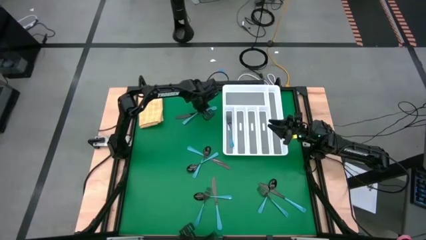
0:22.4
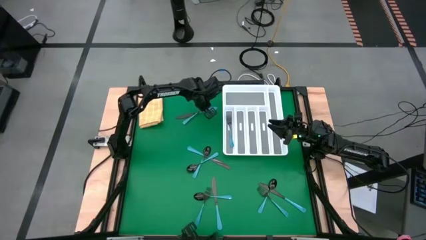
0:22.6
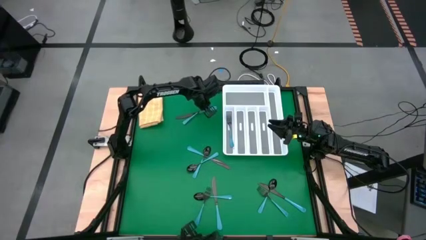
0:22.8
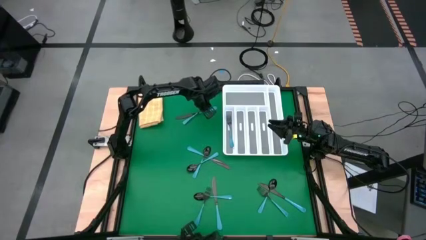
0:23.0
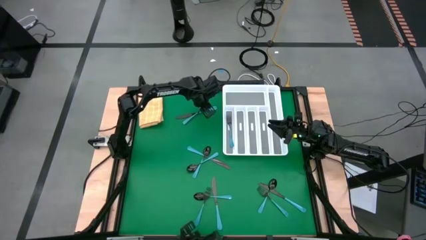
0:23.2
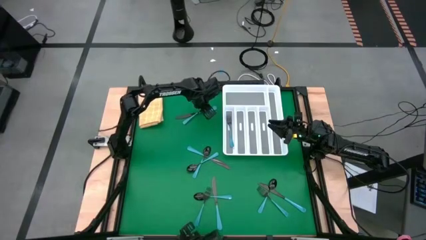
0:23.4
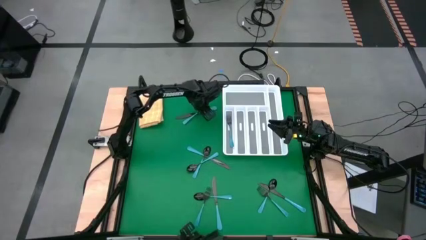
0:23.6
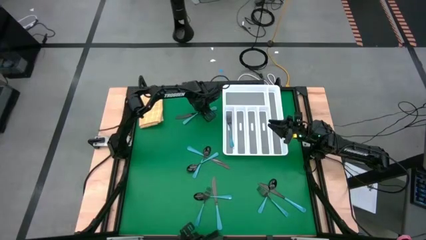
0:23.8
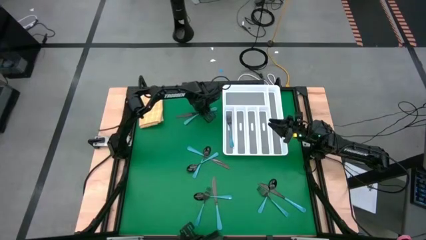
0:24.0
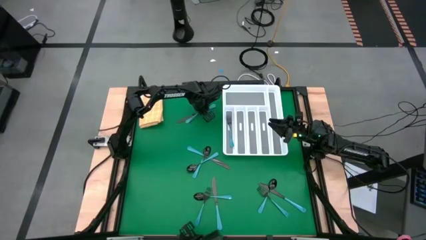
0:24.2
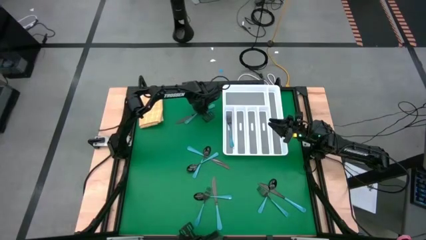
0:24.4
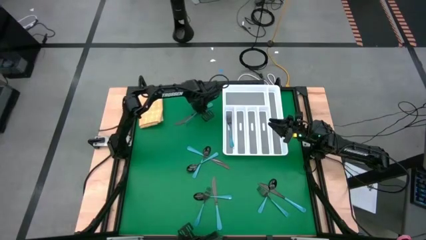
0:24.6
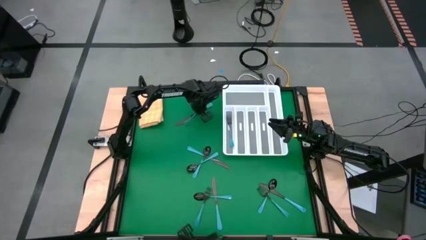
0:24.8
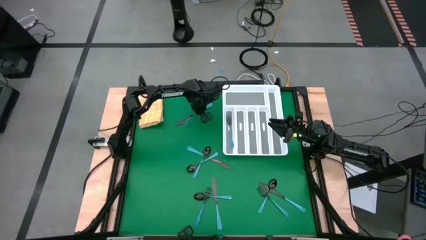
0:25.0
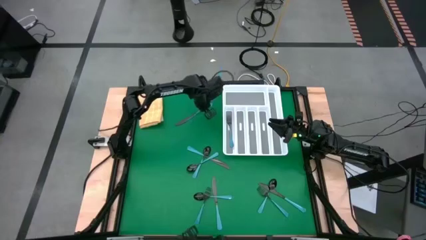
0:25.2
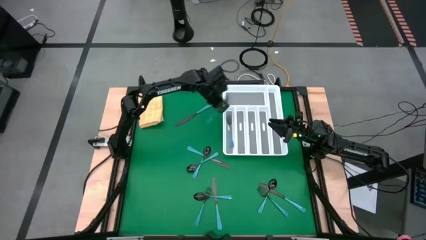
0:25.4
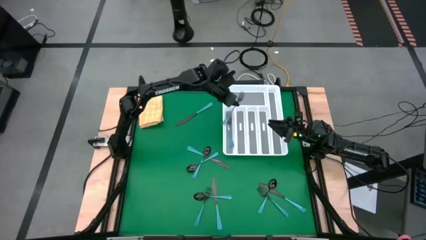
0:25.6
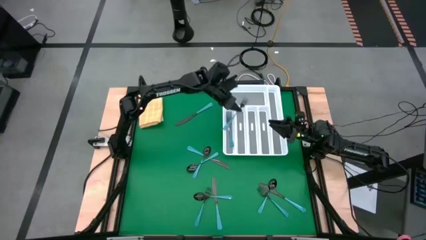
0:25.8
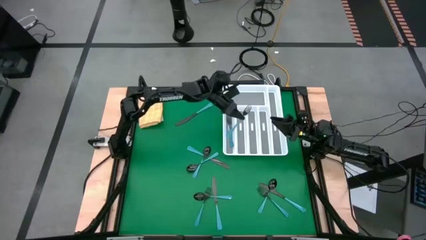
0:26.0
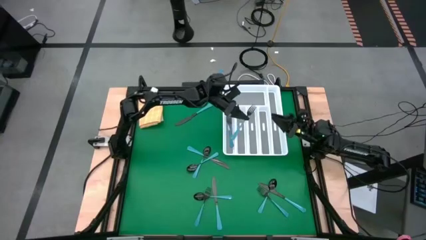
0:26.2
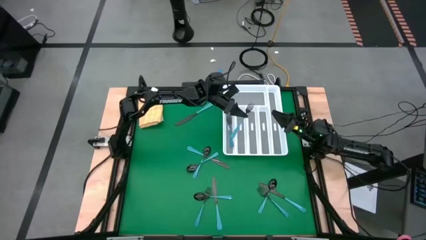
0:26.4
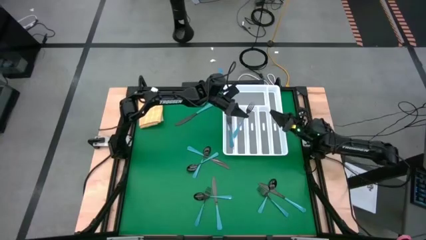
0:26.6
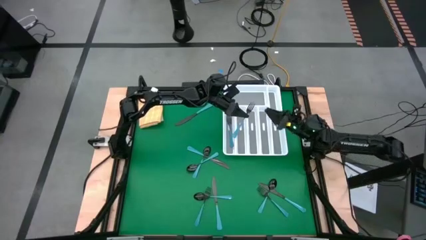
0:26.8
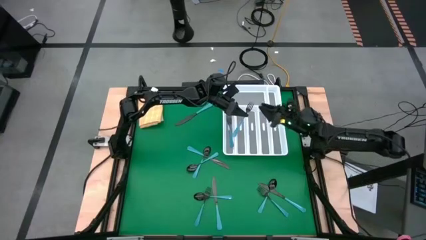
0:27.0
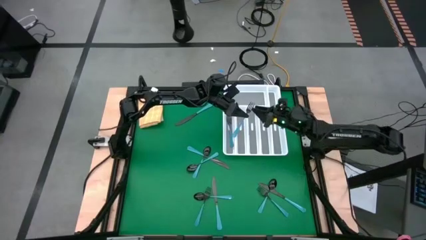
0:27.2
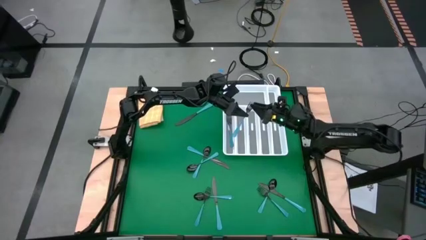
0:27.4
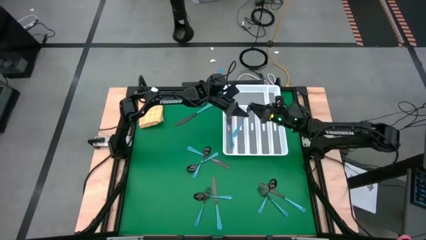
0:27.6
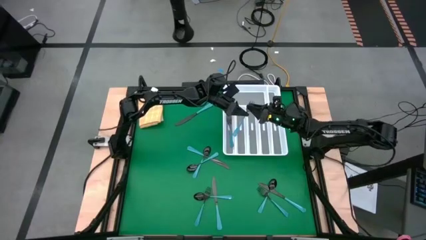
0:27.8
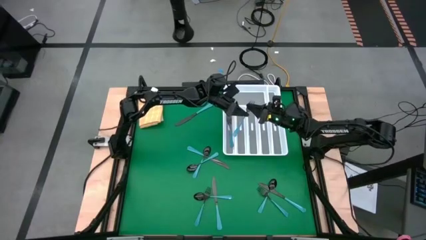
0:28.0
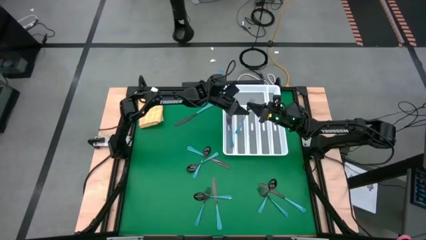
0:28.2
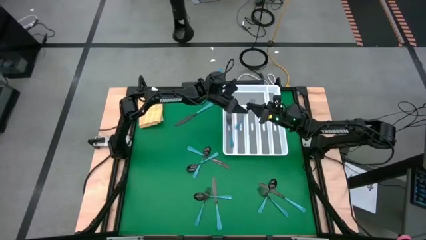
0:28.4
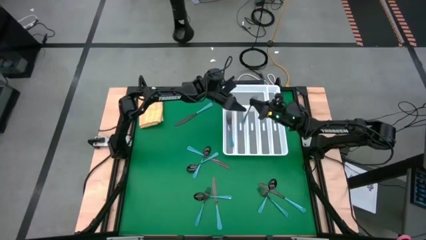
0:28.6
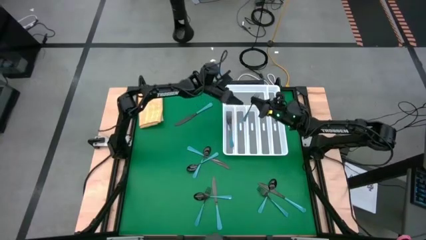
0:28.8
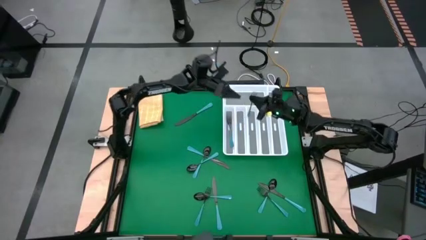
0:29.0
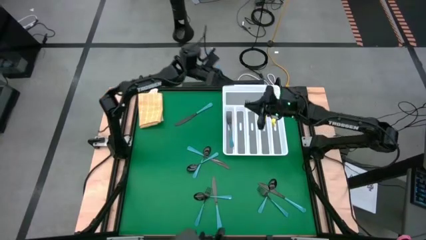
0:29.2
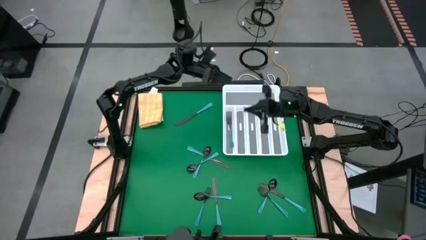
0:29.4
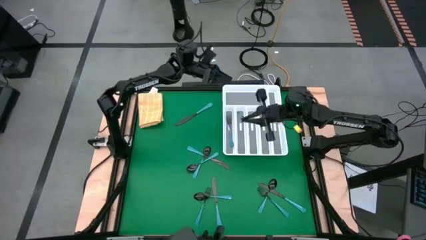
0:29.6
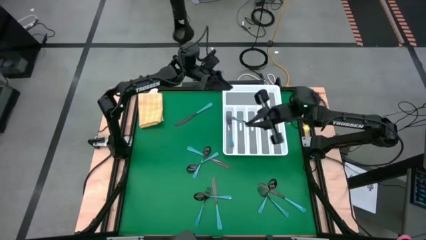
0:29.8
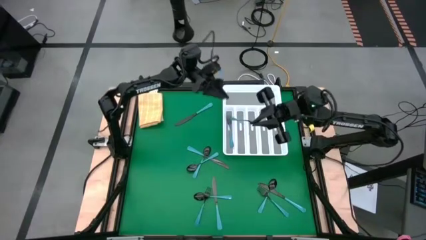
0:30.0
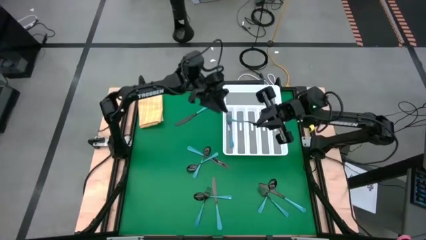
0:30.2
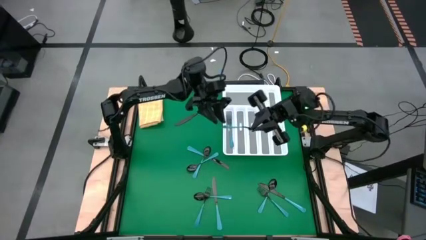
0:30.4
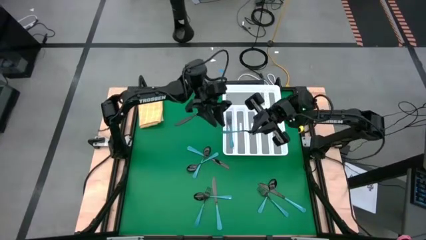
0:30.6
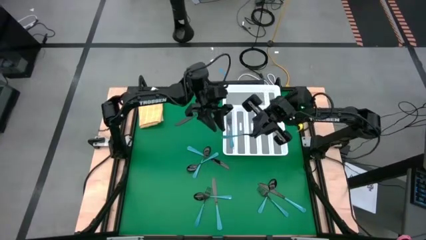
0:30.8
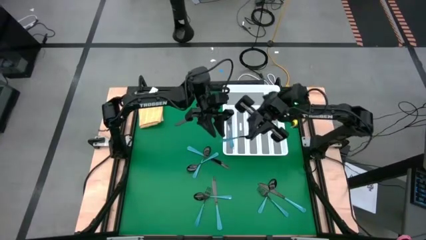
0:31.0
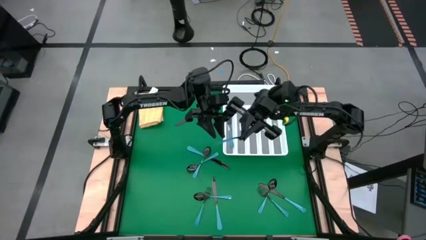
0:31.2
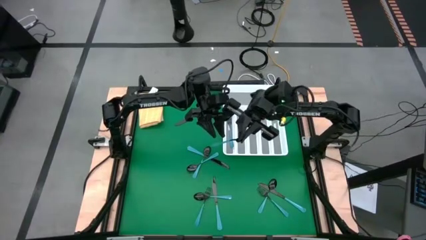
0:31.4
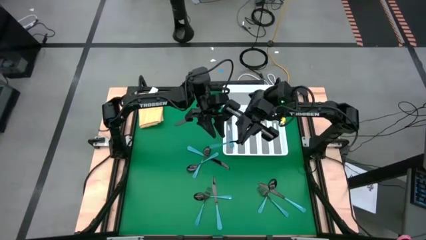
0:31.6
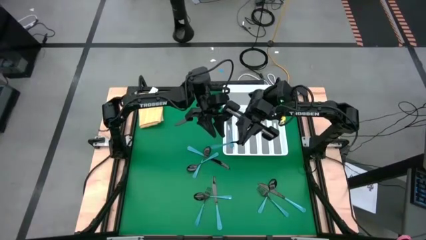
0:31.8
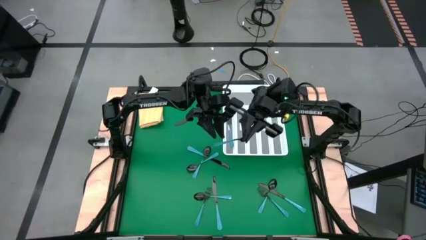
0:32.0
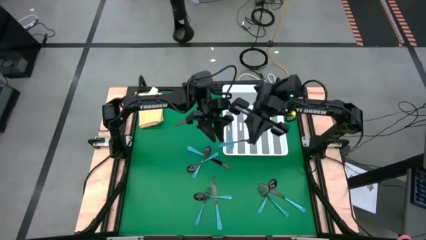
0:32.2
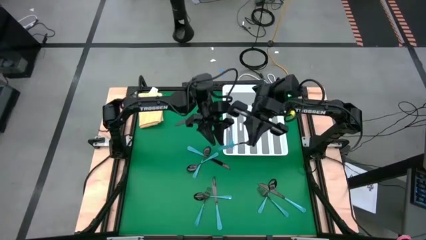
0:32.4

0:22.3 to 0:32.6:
Task: Sort silverware
Put the blue fork into the silverware organizer

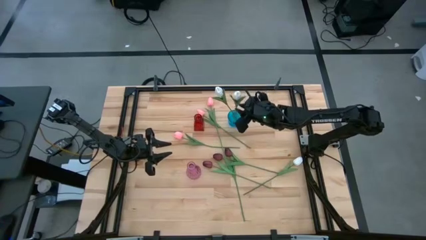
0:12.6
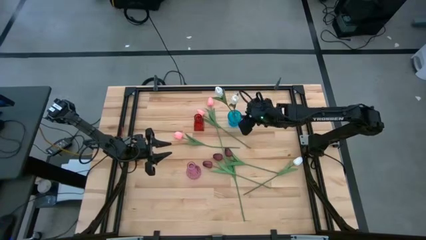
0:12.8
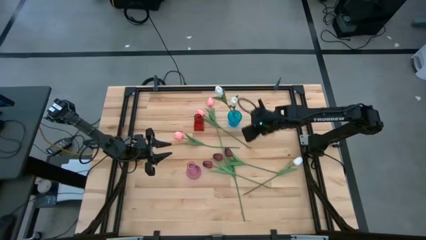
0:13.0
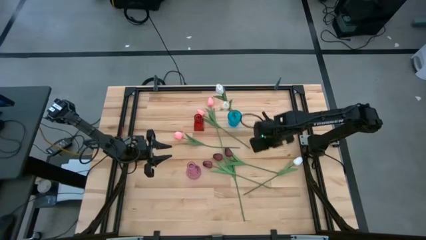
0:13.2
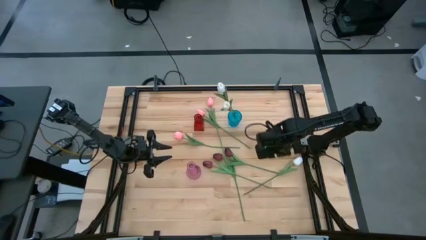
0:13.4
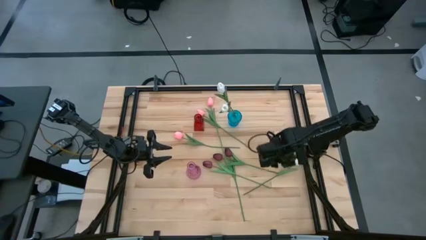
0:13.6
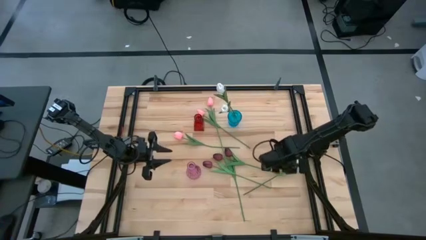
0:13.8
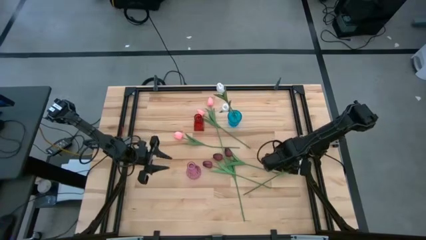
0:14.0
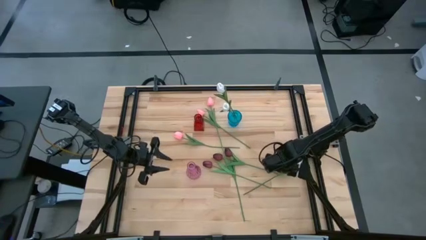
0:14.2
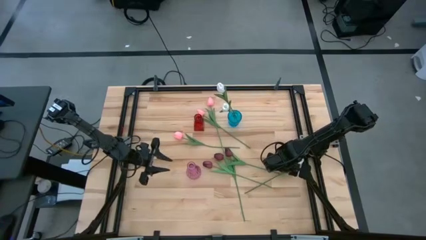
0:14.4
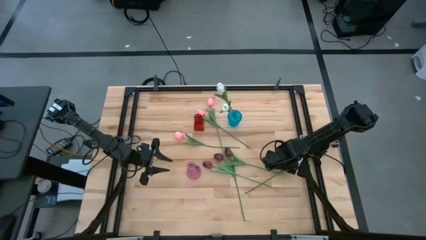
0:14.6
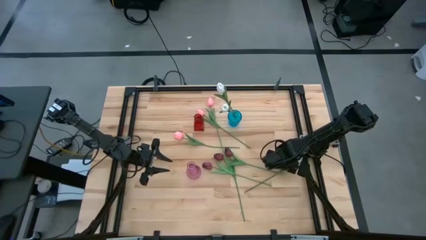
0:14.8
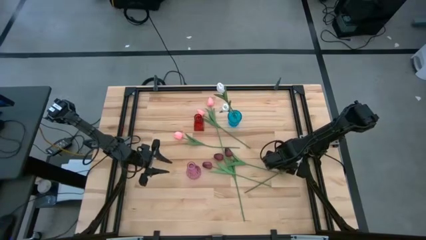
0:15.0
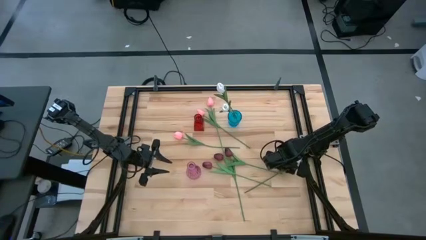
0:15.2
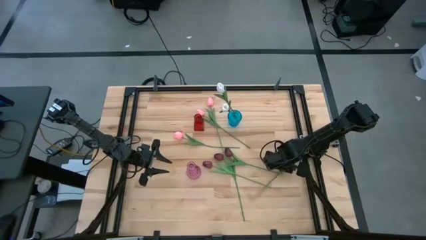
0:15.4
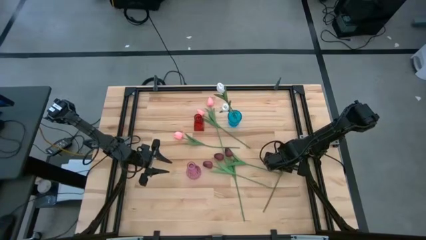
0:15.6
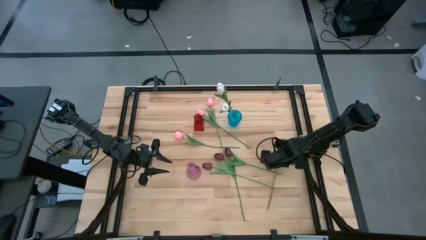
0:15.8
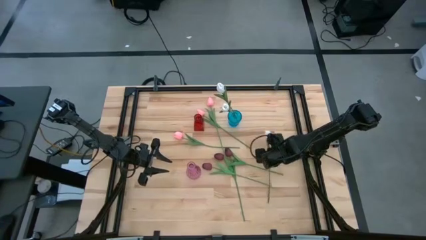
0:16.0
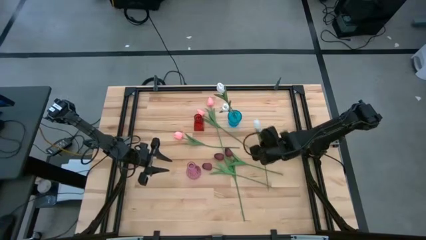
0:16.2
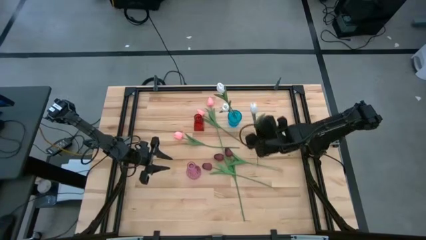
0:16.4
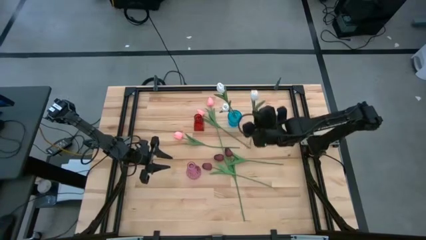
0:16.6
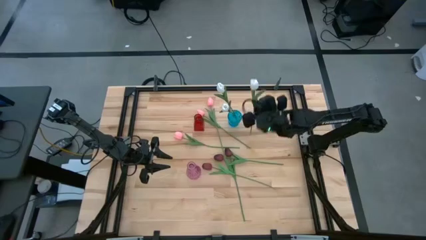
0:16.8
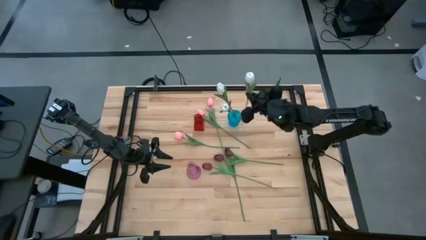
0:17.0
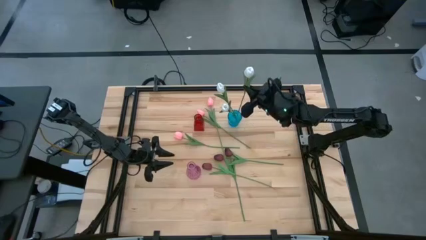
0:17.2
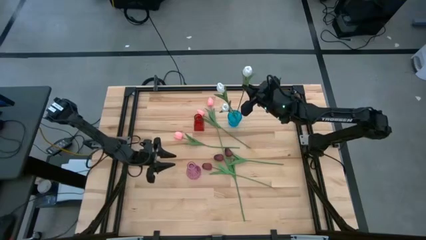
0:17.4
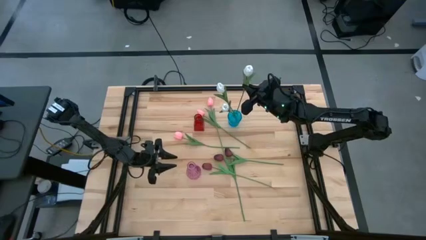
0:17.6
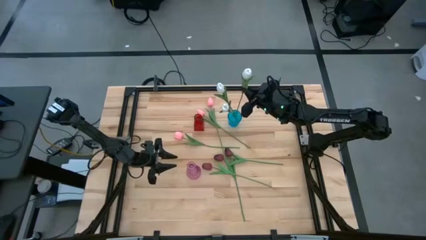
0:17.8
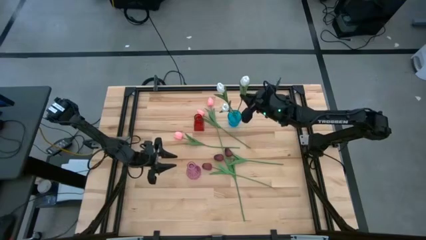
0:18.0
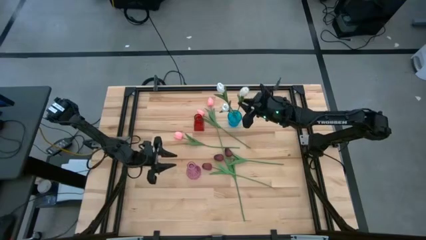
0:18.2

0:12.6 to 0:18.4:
Task: Sort flowers into vase by color
Put the white flower into the blue vase

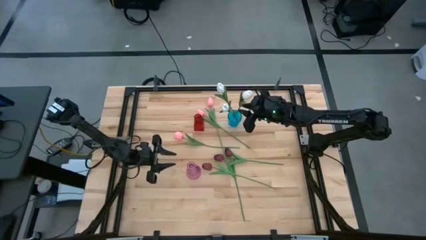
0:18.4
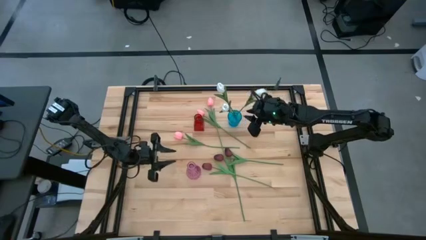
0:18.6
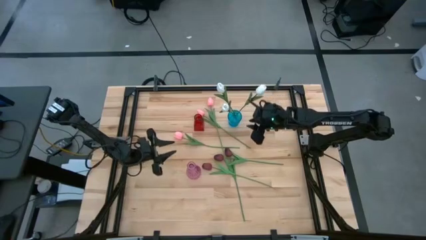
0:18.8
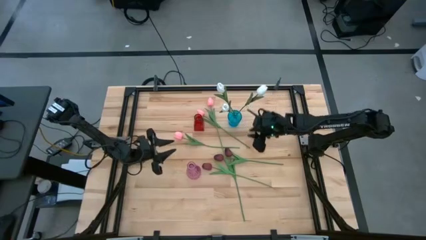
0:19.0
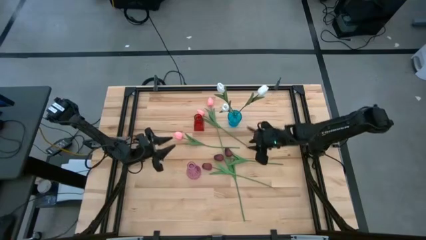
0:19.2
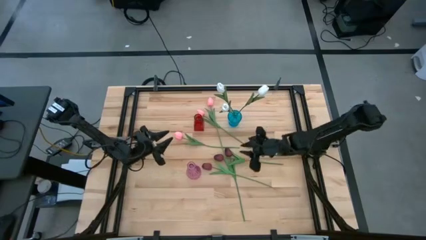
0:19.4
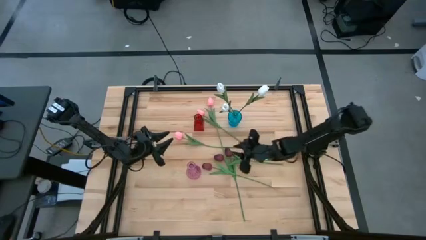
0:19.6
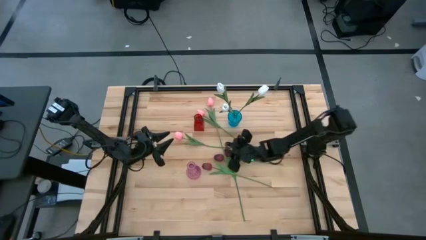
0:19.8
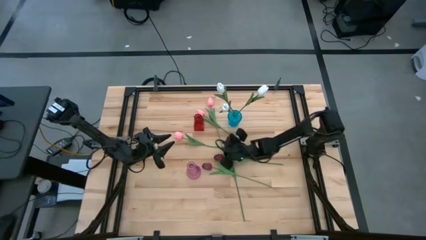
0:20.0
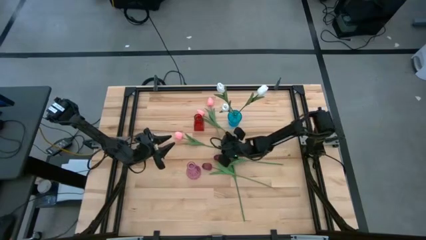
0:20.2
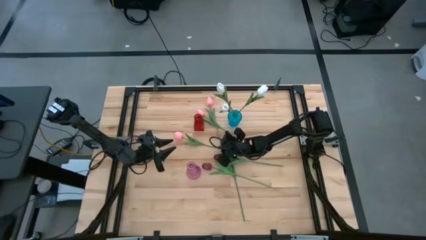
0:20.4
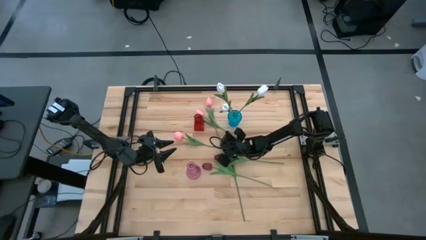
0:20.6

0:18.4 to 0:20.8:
Put the right pink flower into the pink vase
